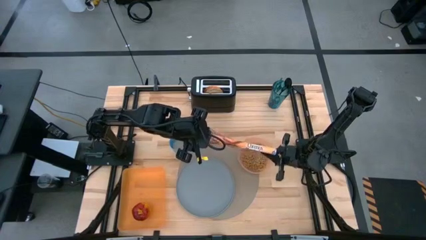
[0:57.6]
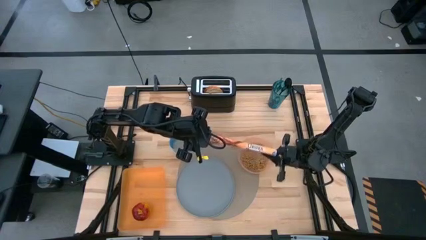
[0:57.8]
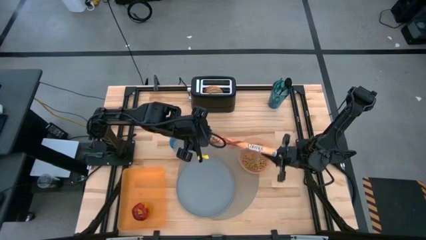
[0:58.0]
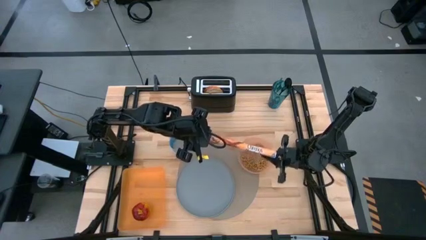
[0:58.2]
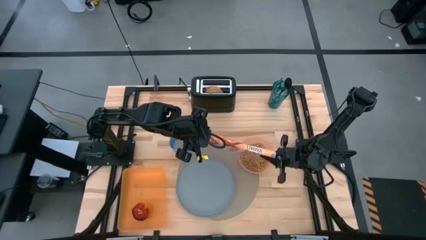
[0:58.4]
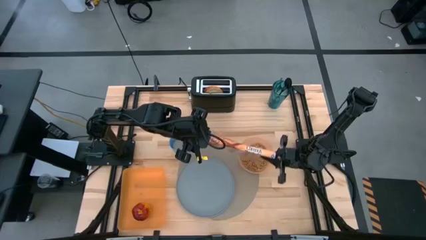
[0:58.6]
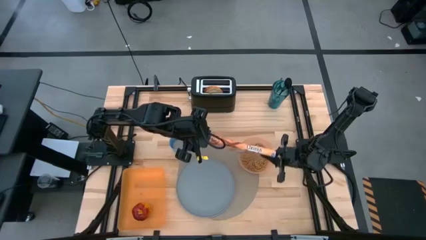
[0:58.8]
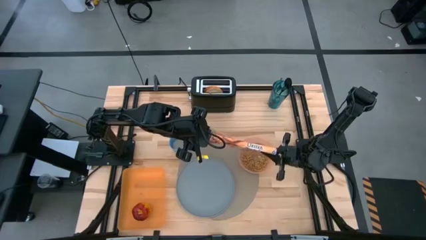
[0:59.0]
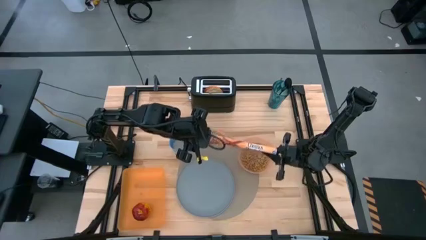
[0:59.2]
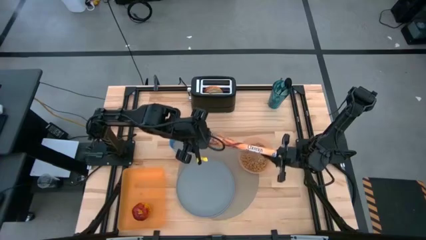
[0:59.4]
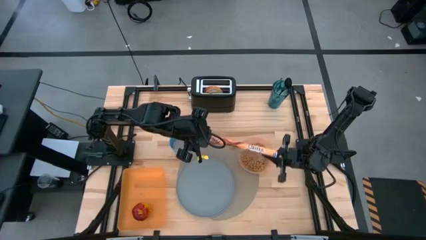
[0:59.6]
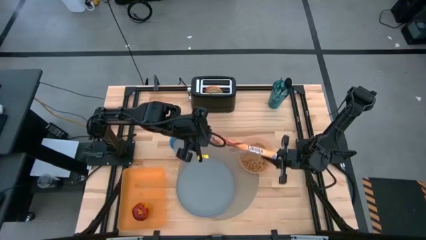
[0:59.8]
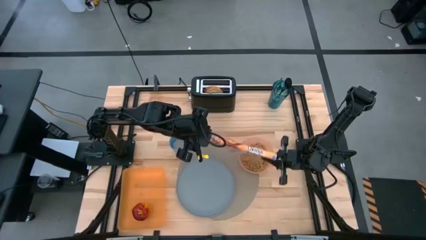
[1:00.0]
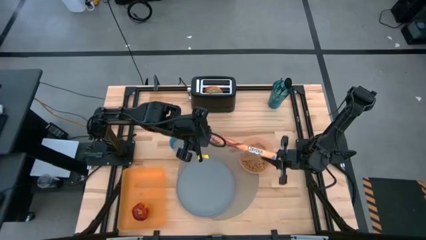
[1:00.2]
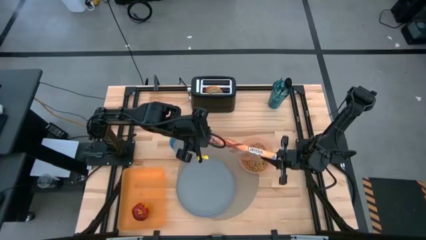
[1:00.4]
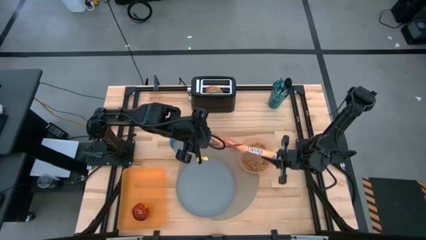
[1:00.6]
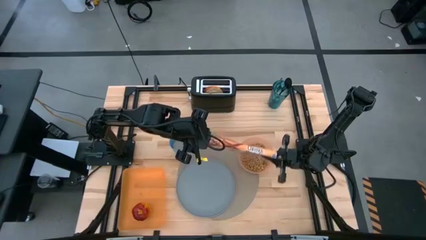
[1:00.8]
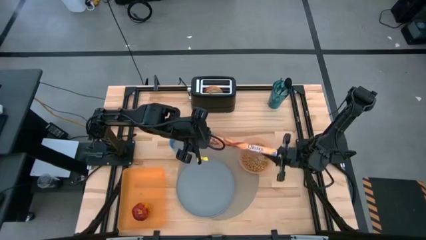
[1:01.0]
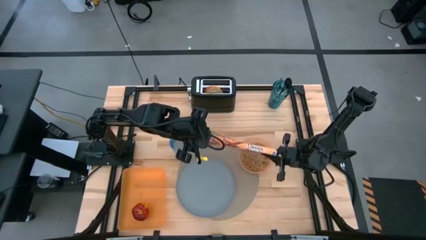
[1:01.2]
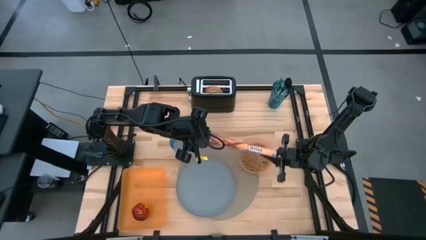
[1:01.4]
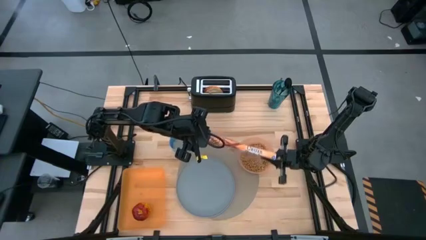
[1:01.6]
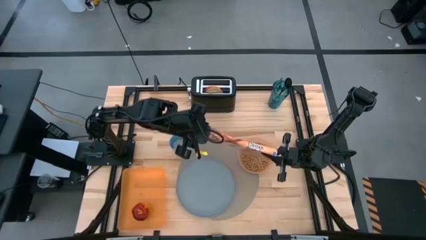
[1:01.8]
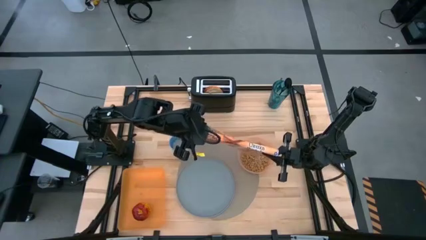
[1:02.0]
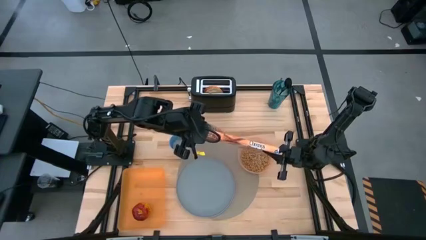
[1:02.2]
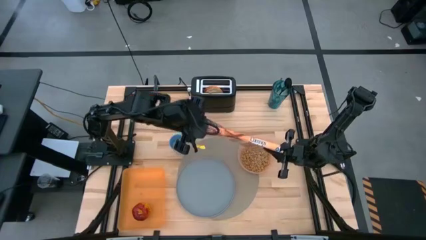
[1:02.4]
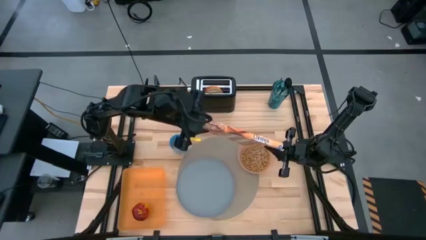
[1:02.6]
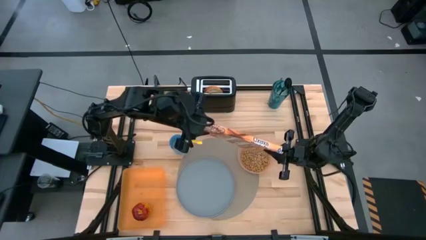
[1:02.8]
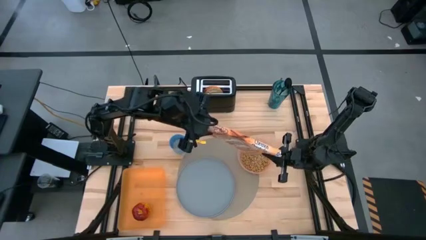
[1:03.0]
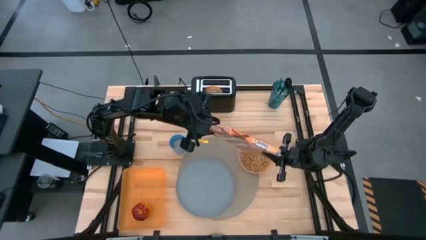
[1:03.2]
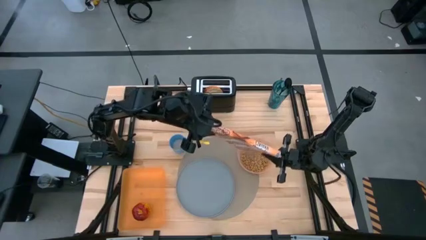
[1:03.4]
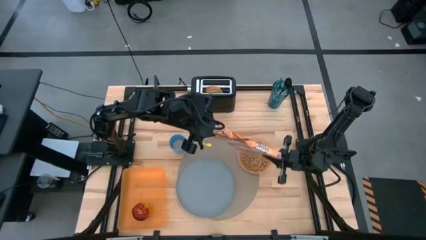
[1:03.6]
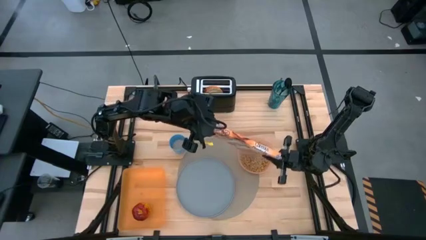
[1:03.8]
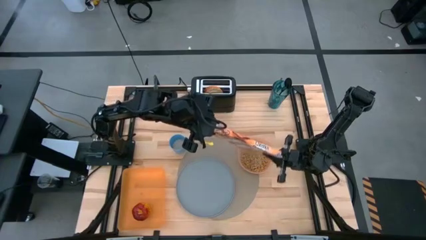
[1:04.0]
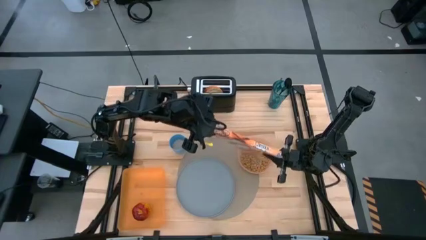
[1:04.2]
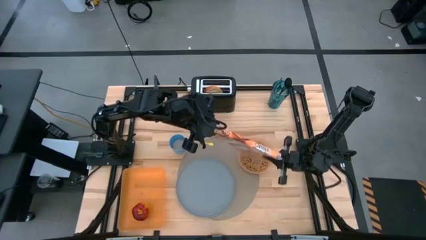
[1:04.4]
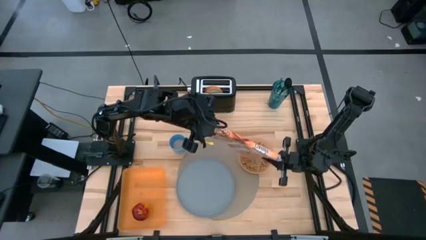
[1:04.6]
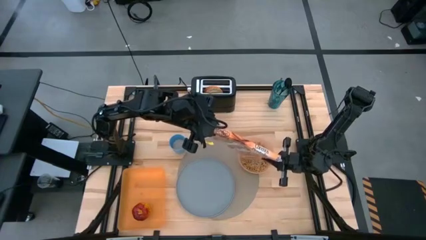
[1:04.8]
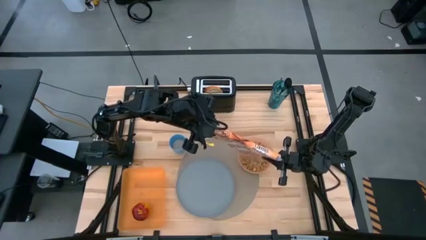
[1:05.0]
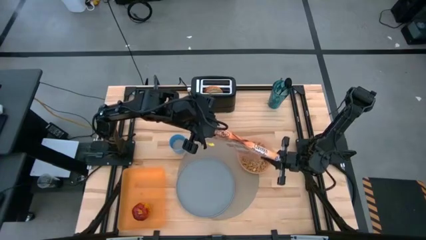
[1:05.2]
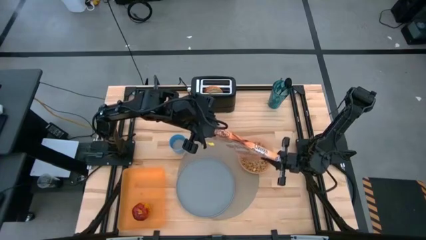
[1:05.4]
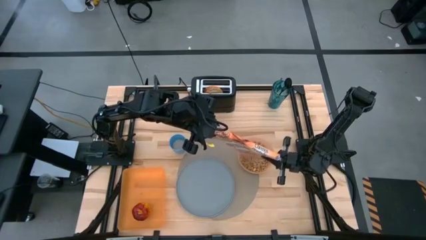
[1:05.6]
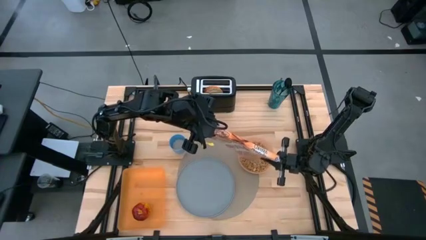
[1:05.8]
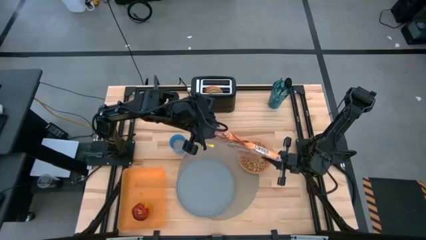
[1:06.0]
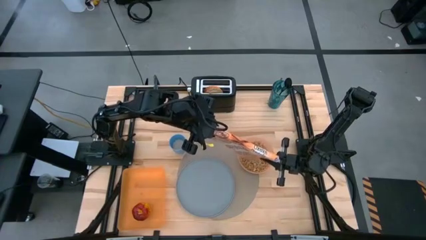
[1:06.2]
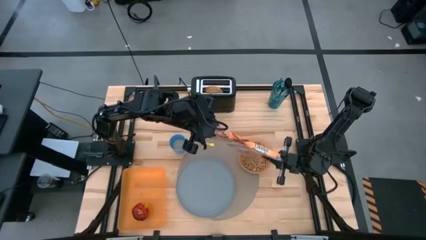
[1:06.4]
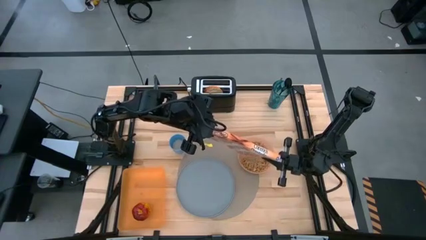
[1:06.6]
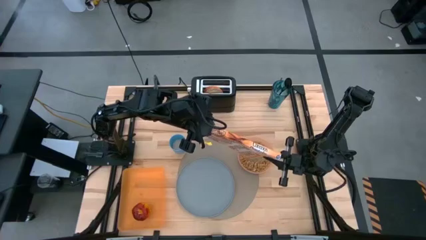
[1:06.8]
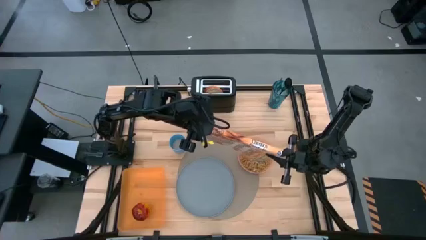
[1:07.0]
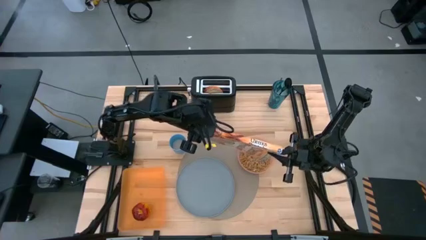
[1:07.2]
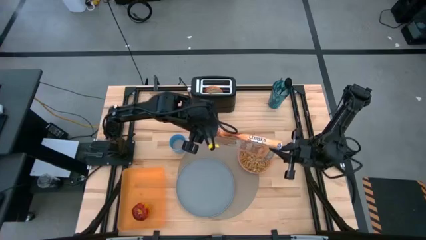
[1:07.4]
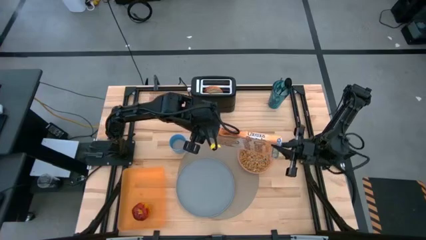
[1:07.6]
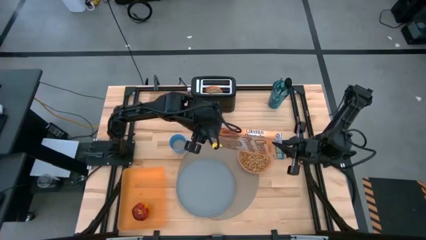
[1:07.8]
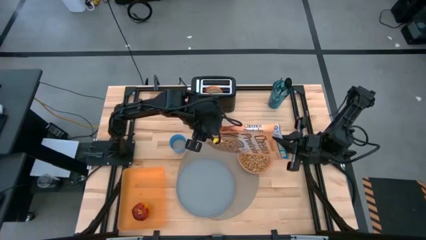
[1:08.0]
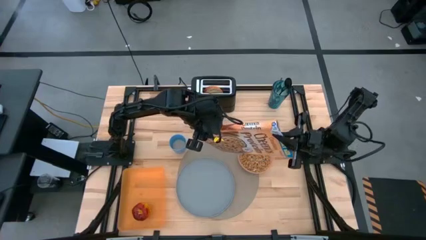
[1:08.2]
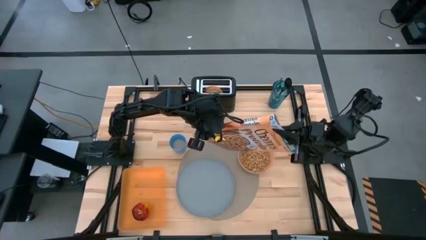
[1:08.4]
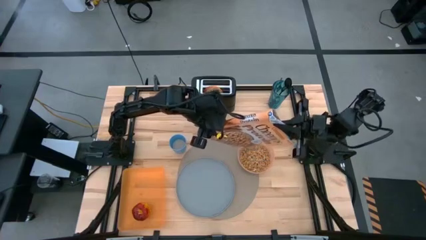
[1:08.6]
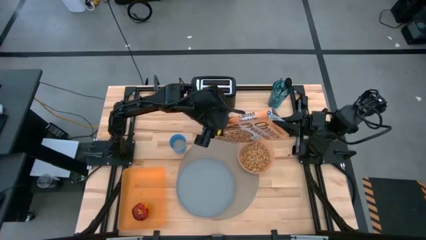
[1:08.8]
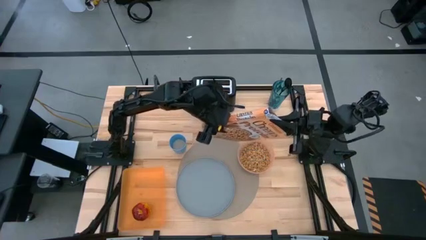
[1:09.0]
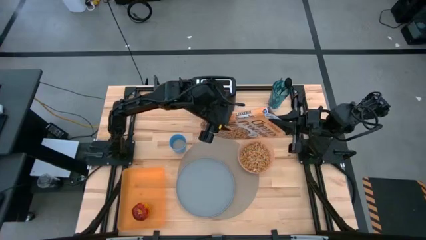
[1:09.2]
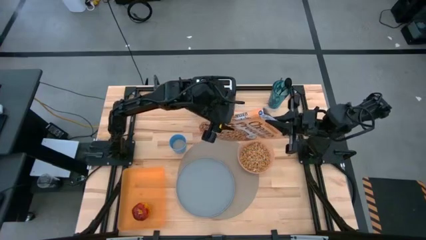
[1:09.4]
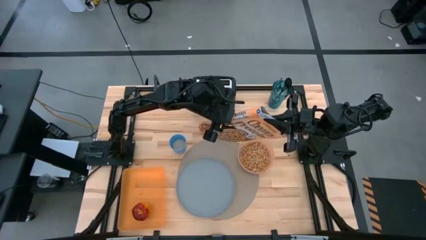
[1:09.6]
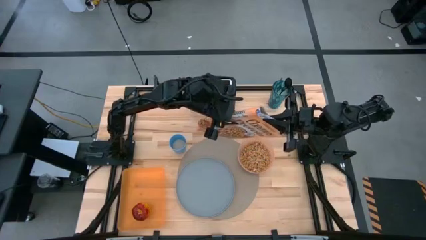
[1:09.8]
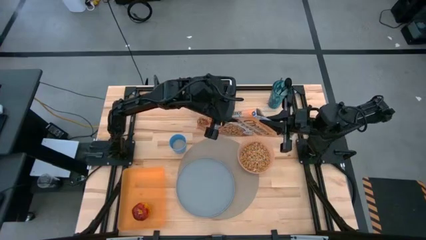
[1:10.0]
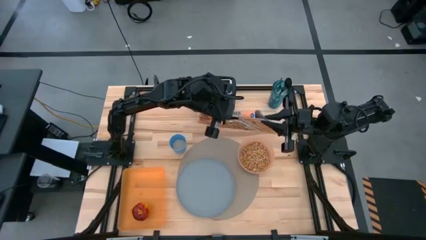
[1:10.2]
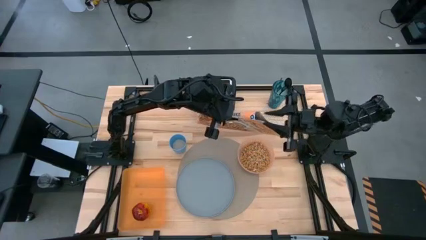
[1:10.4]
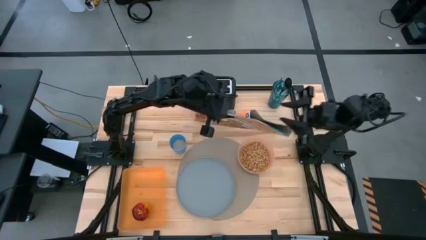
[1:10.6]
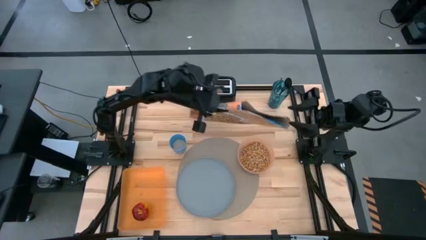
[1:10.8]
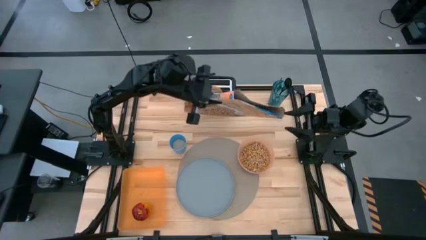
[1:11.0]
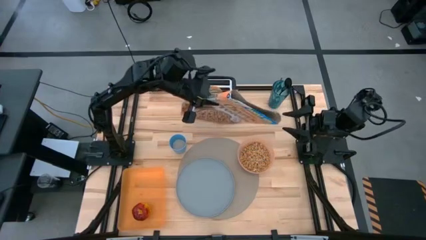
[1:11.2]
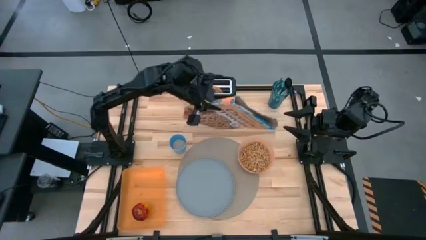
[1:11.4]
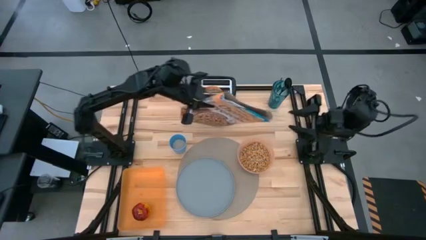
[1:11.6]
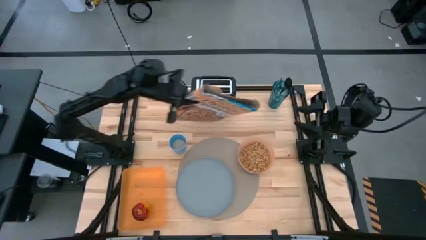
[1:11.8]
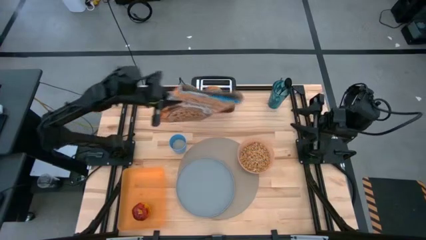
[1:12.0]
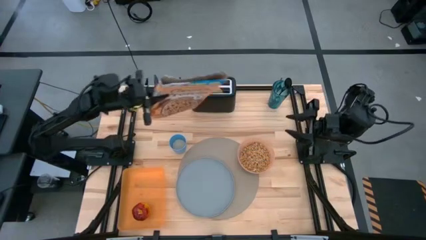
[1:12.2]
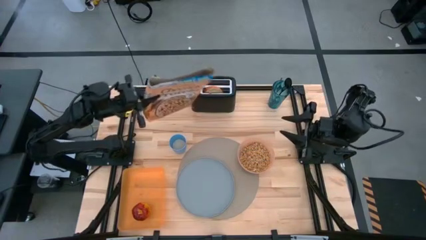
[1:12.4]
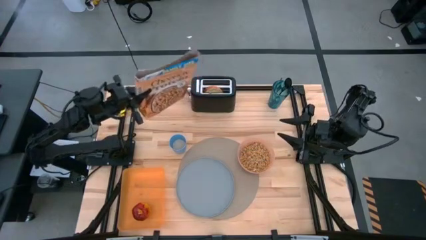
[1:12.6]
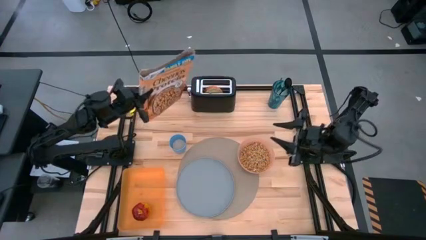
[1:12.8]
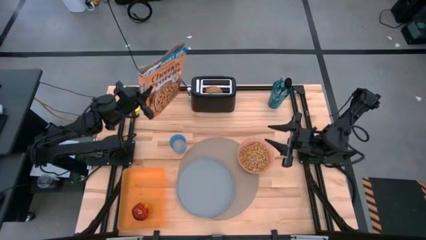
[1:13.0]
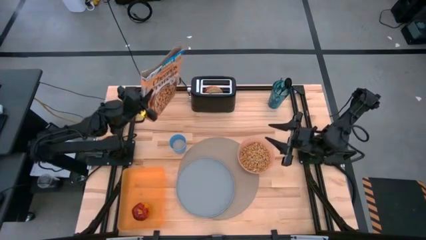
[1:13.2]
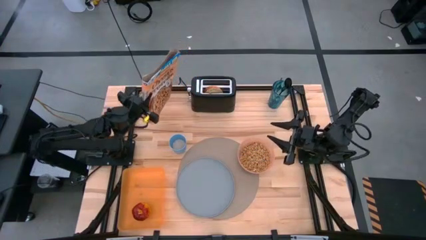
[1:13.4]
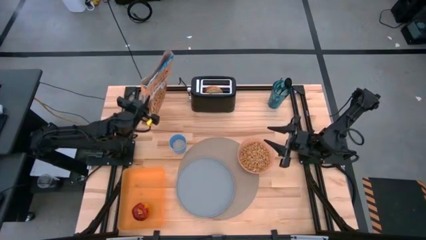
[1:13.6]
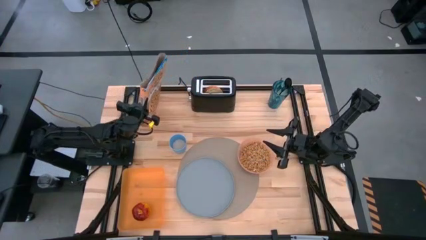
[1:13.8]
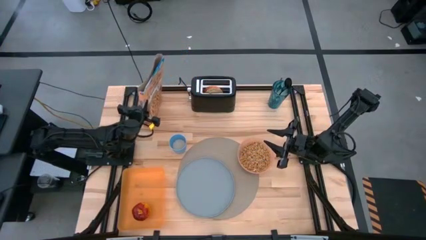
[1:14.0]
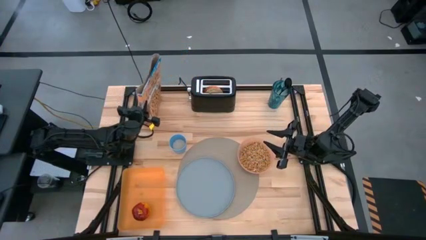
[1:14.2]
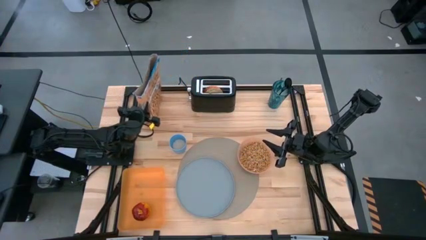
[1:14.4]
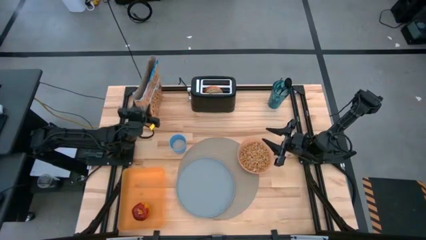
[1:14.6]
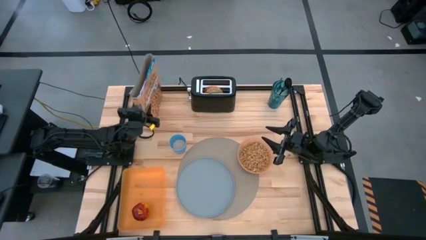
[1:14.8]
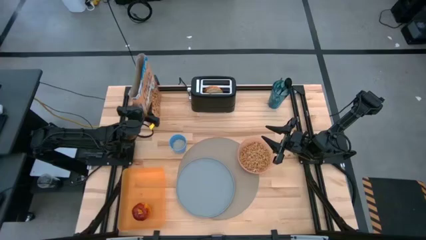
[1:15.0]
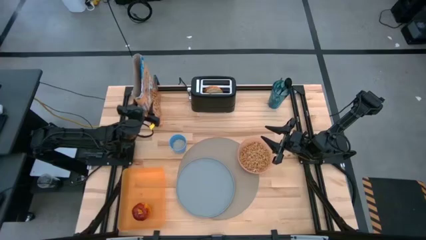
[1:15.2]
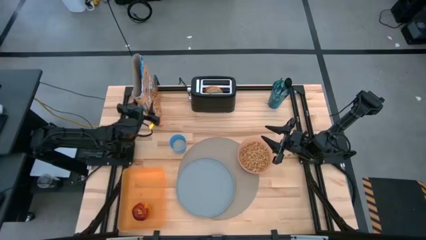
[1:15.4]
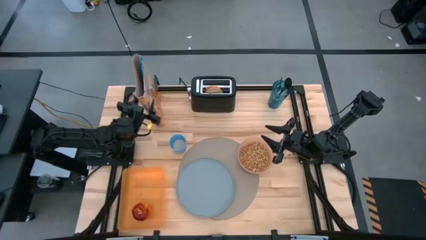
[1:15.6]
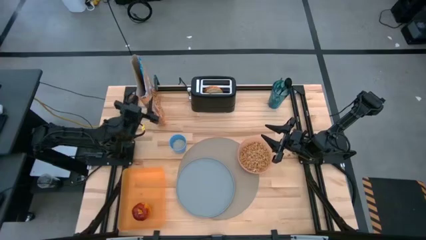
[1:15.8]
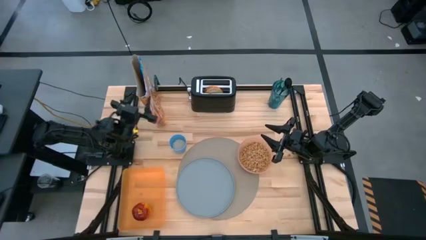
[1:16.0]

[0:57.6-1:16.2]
Task: Arrange a breakfast setting
Pour the cereal from the yellow cereal box into the orange bowl
